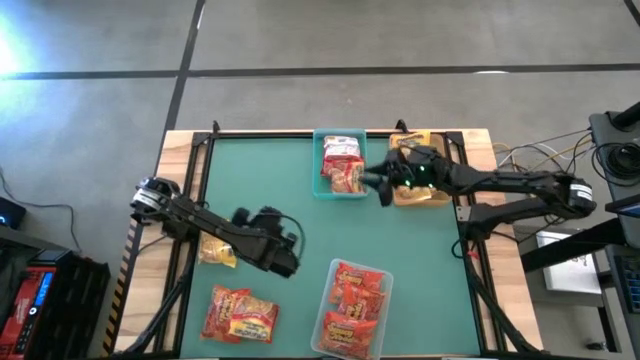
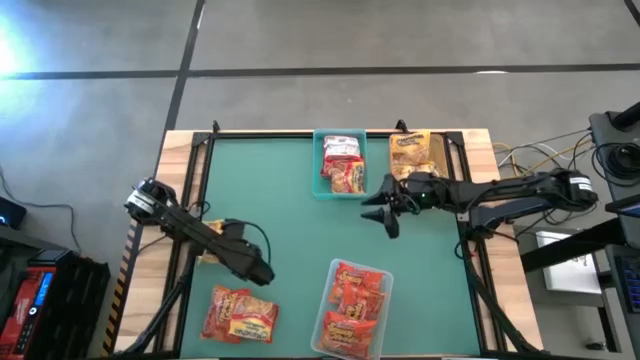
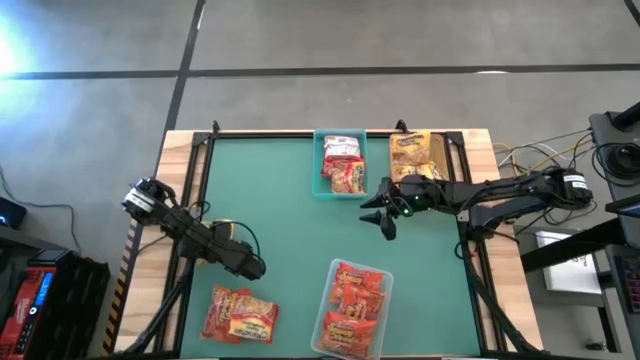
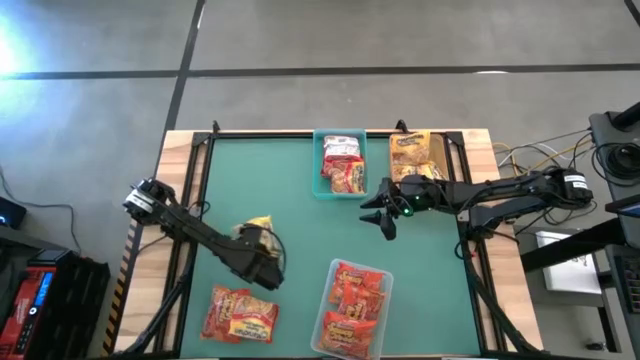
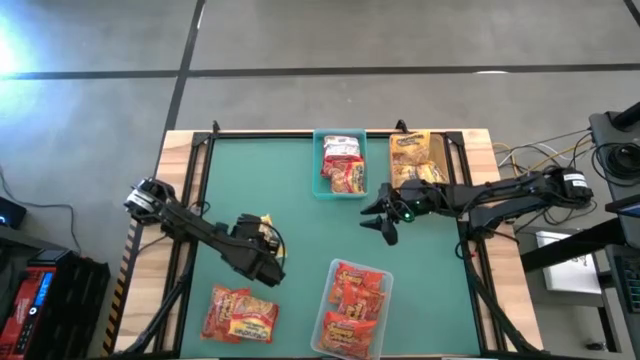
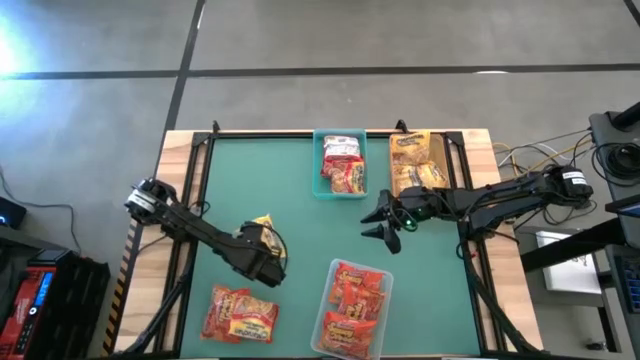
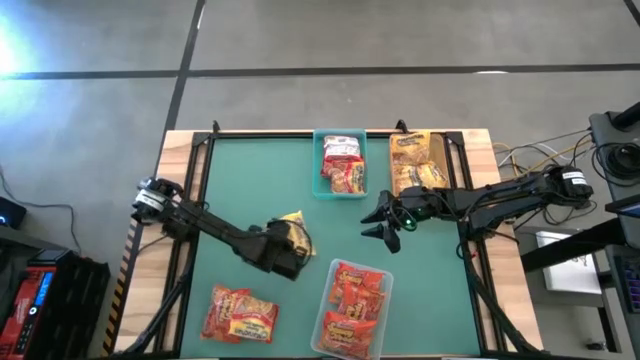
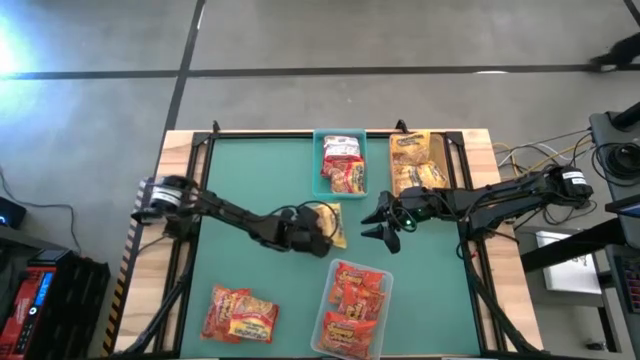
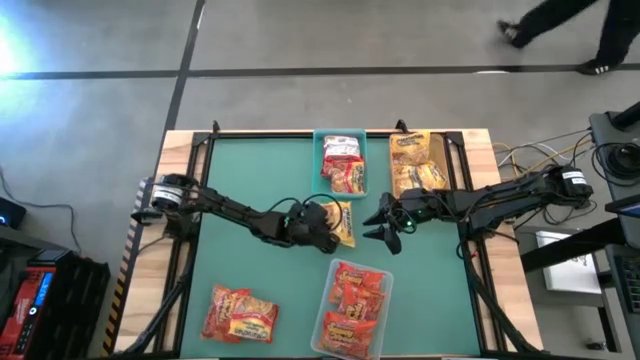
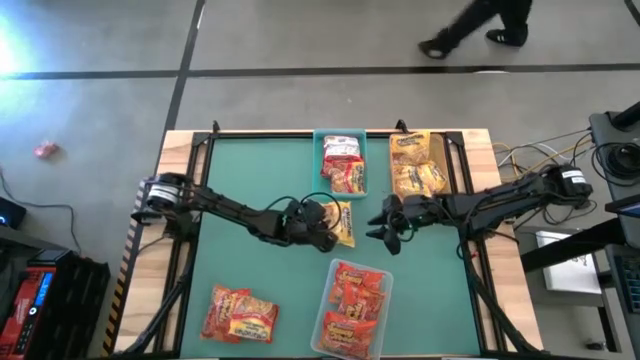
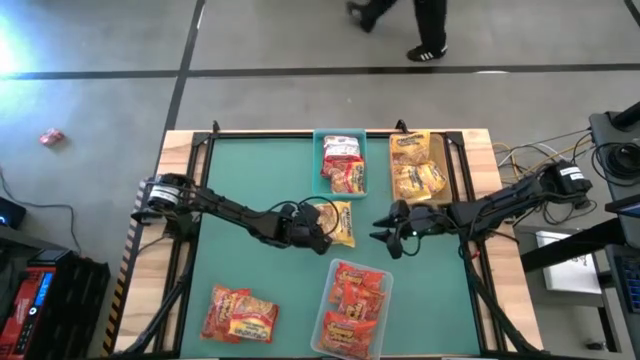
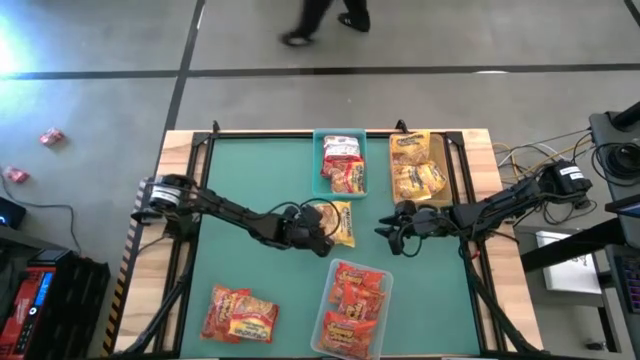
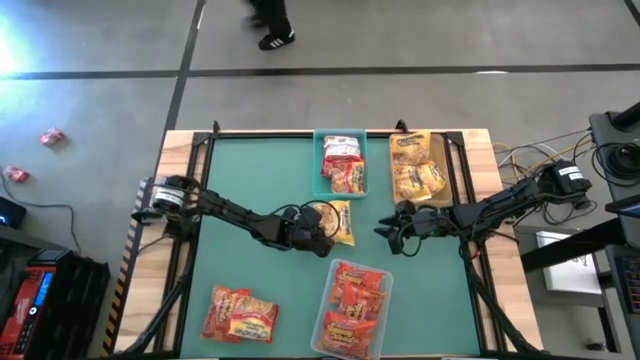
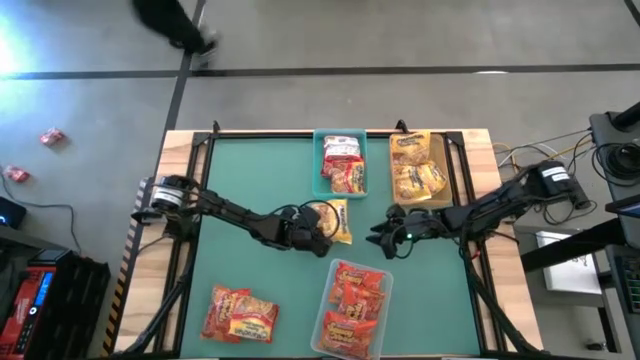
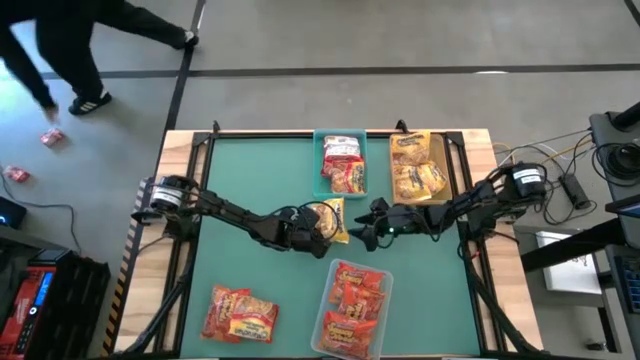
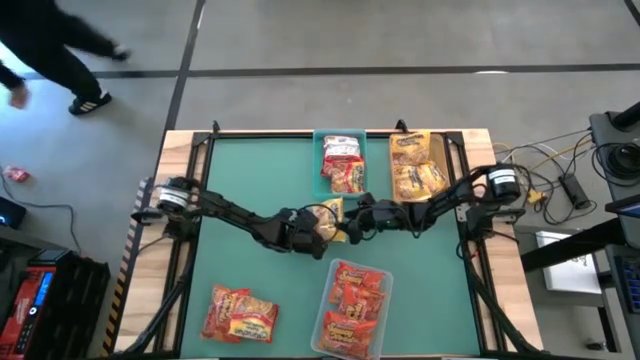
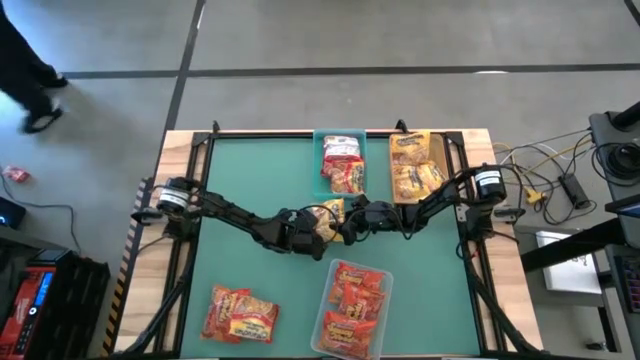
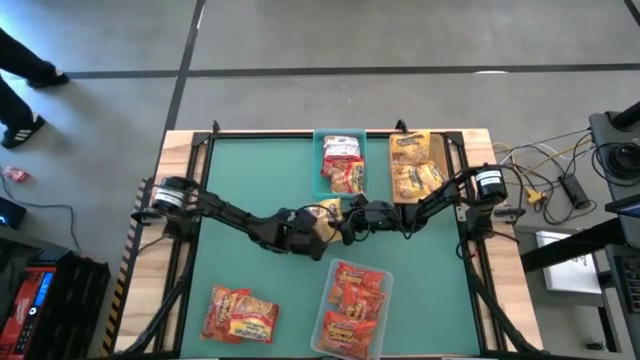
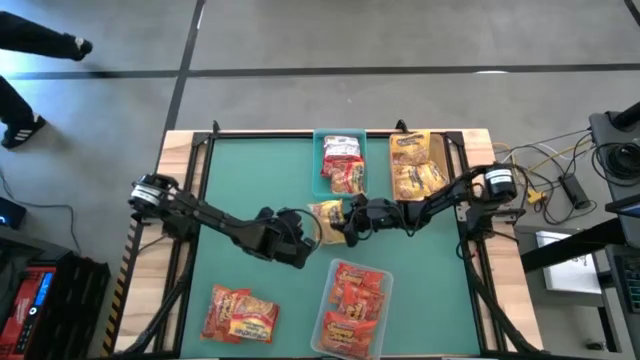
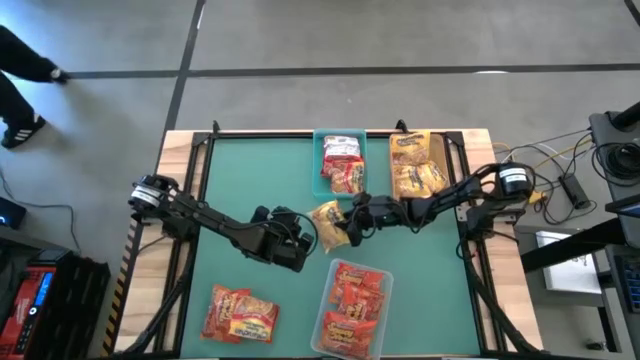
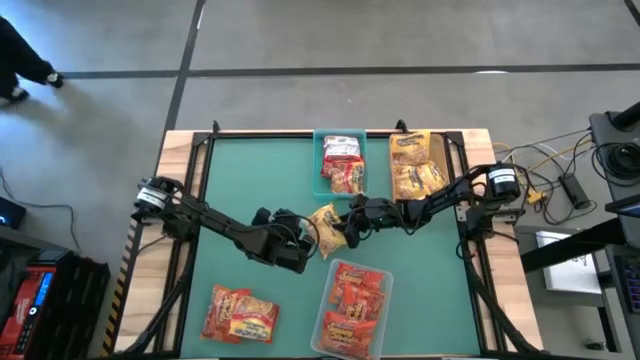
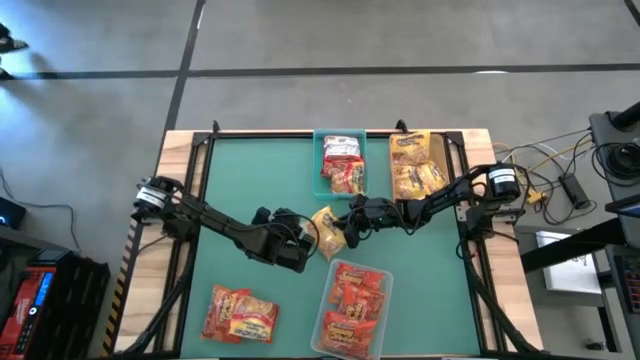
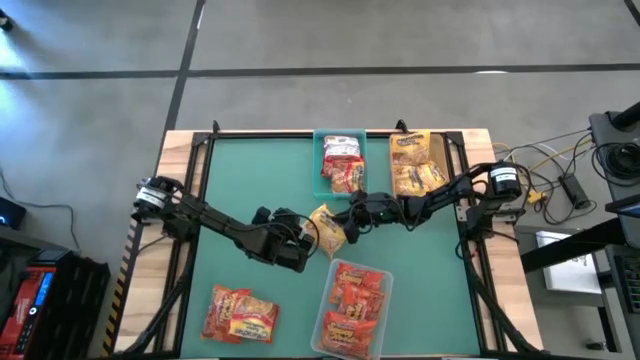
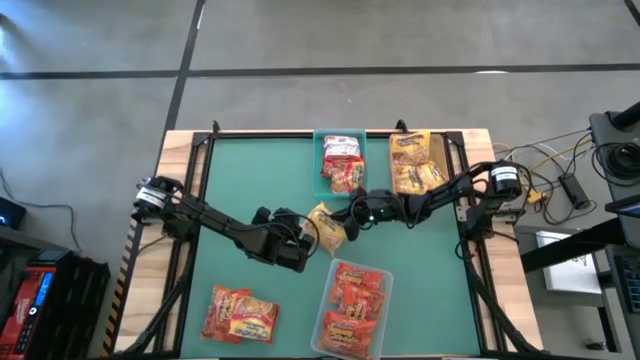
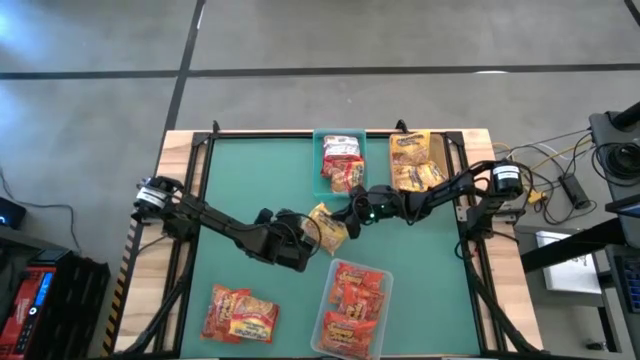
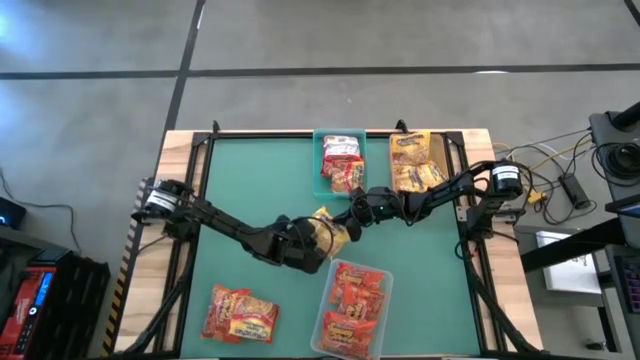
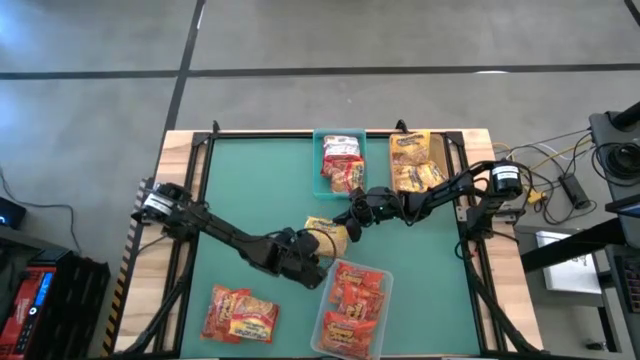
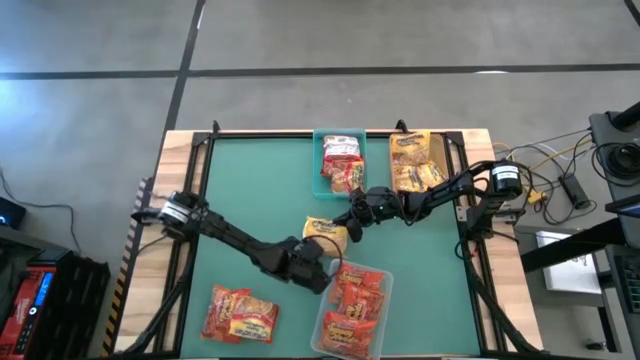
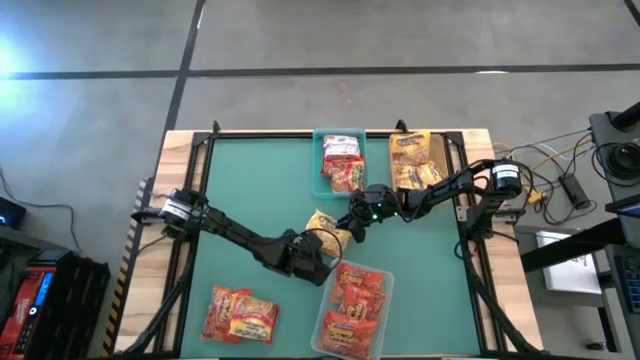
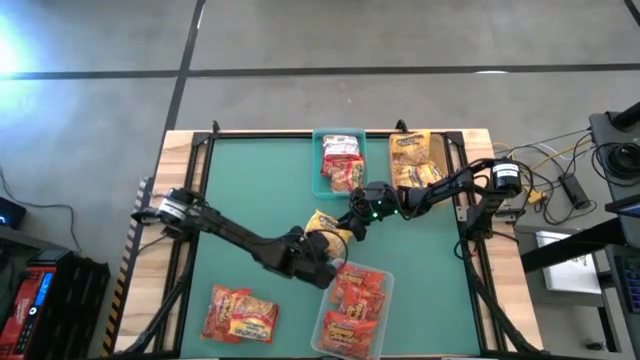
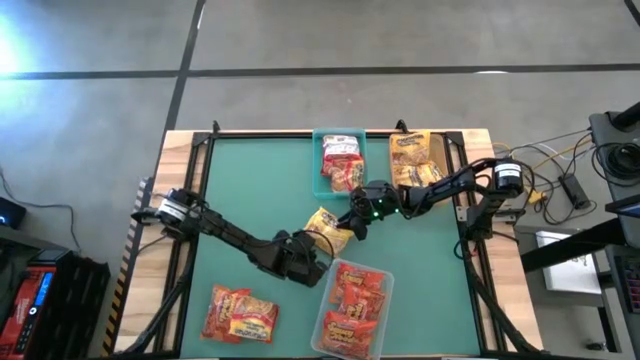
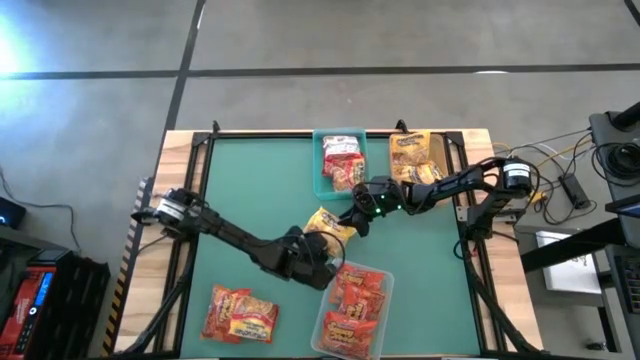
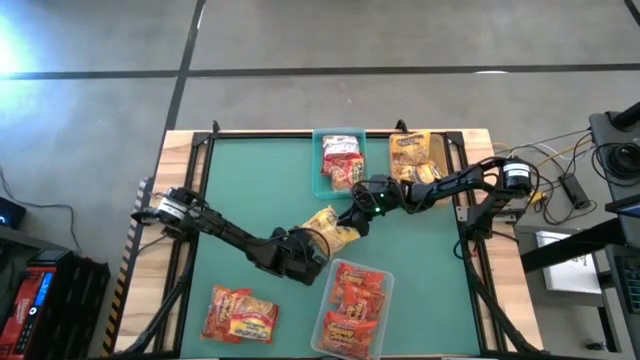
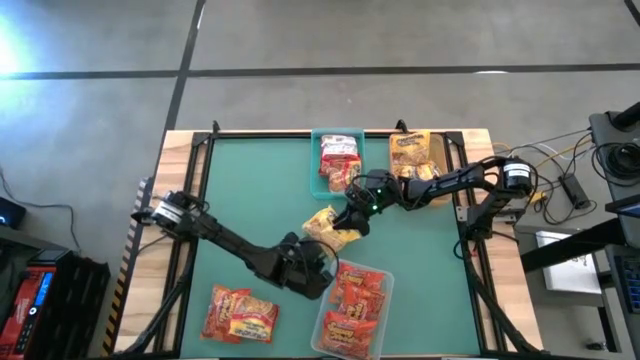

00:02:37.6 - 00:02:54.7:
Task: Sort Maruchan noodles
Put the yellow noodle pack into the transparent orange bin

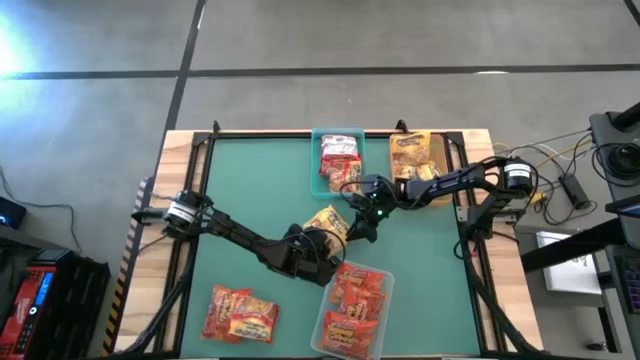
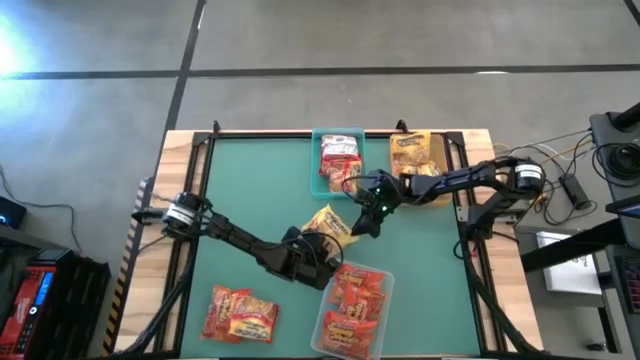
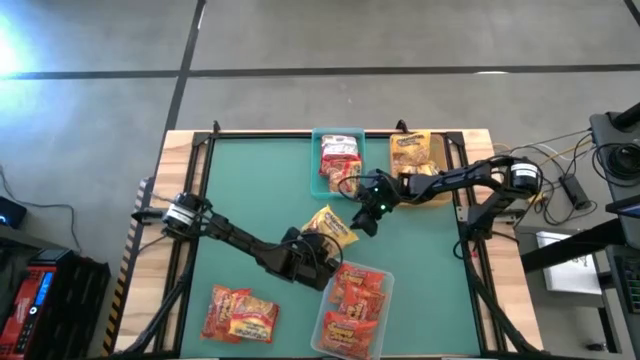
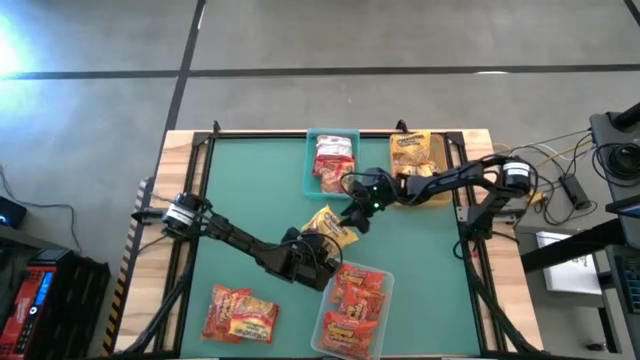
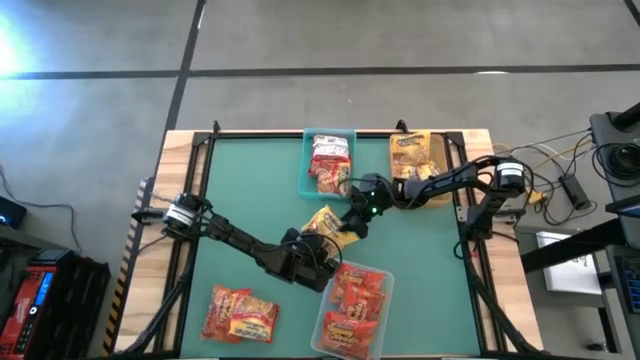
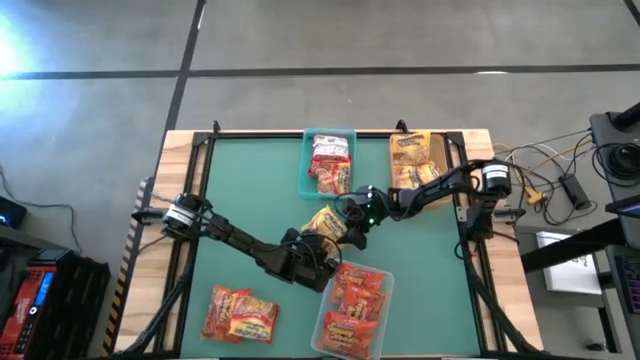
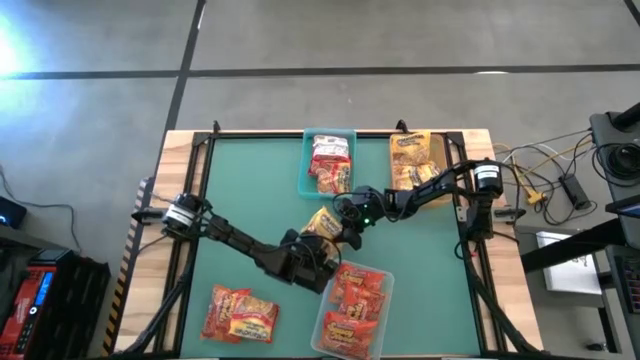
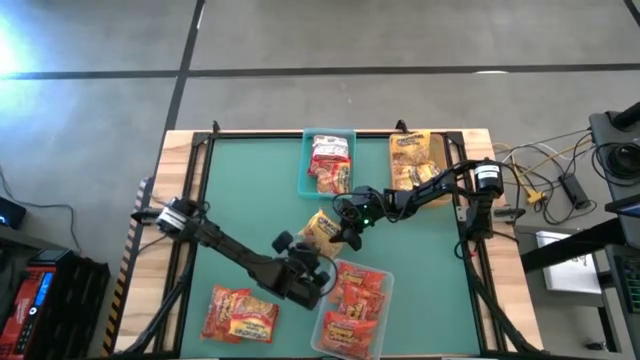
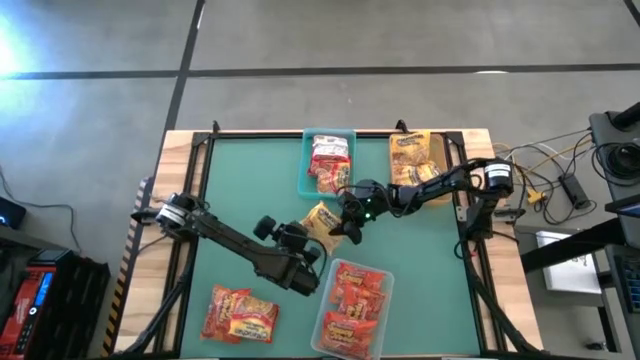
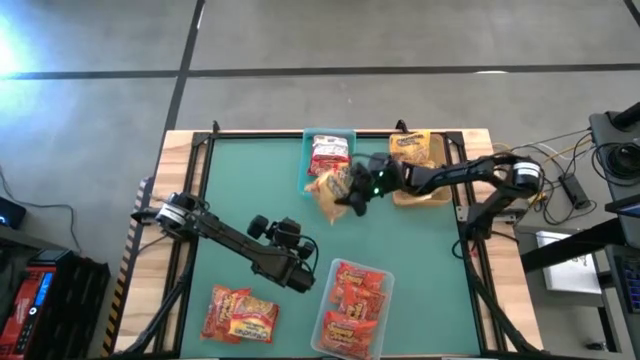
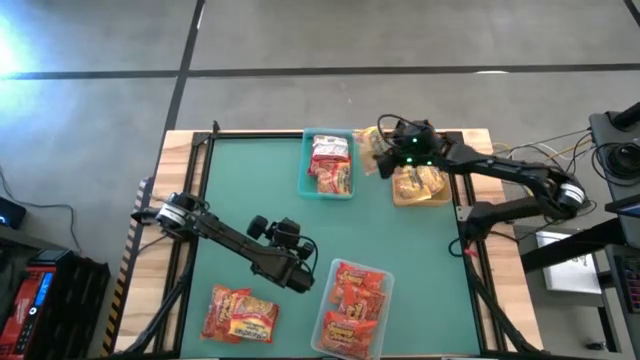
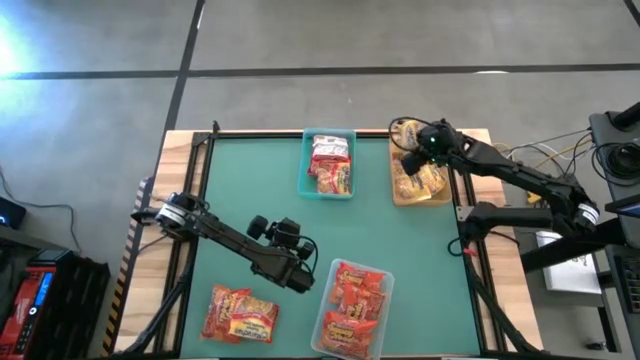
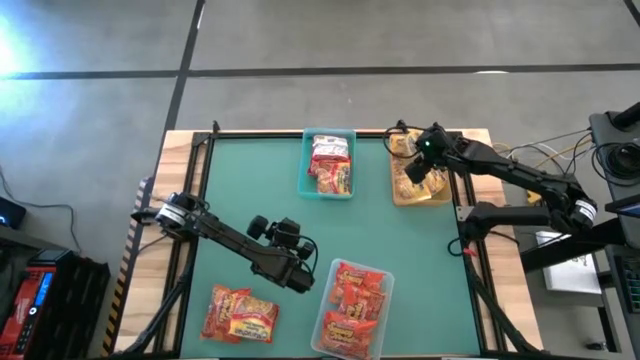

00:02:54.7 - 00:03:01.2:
Put the yellow noodle pack into the transparent orange bin
